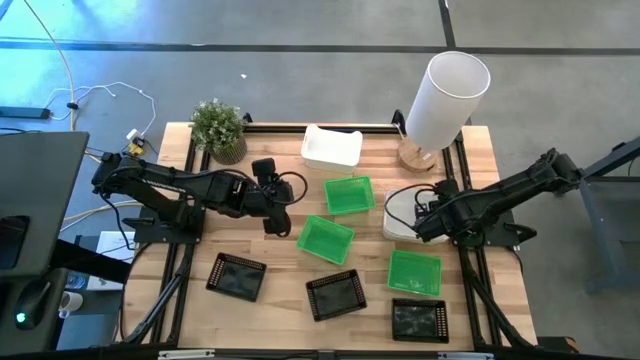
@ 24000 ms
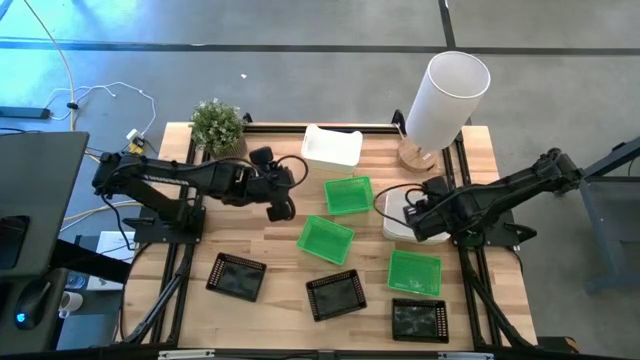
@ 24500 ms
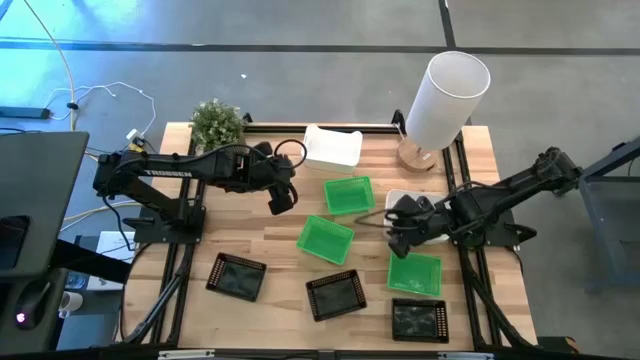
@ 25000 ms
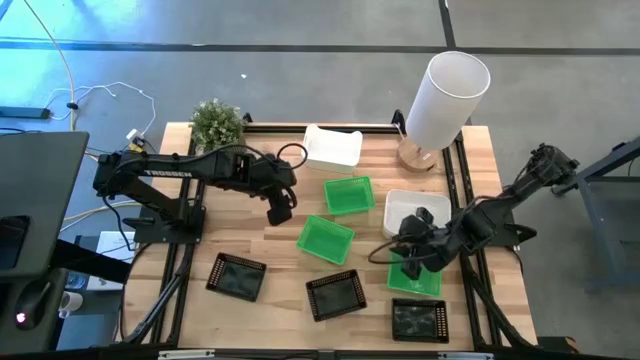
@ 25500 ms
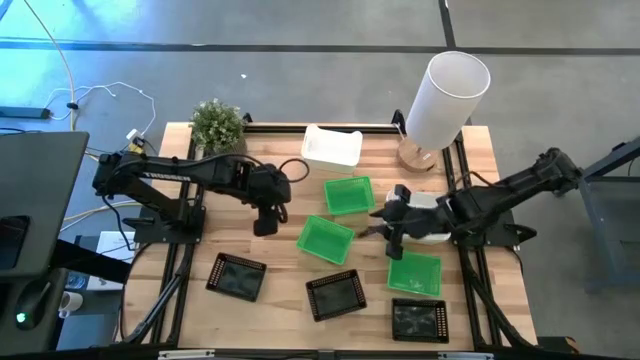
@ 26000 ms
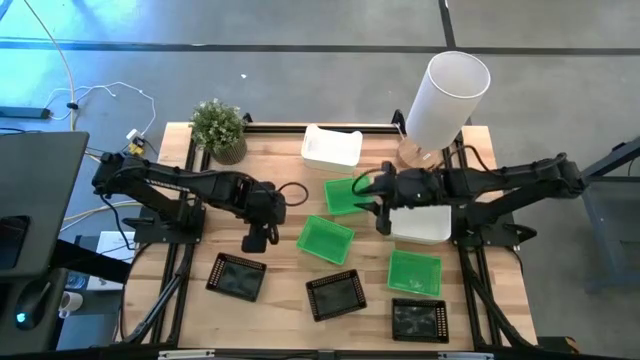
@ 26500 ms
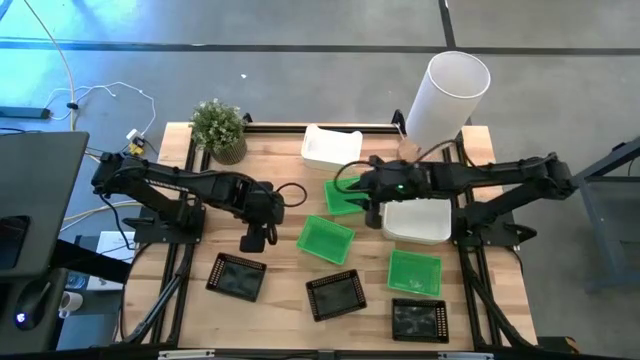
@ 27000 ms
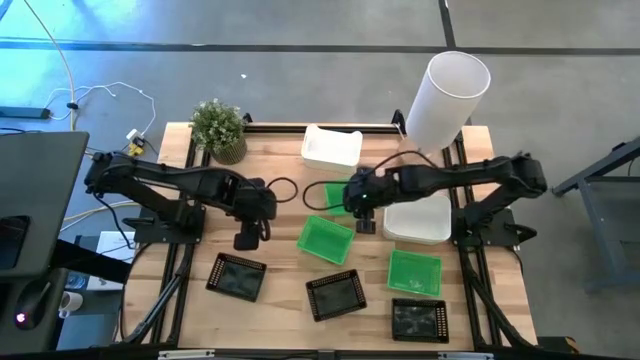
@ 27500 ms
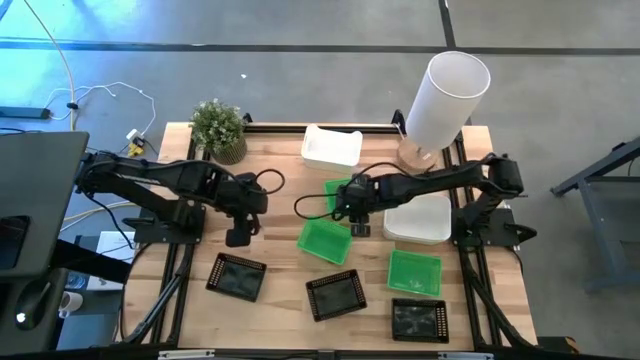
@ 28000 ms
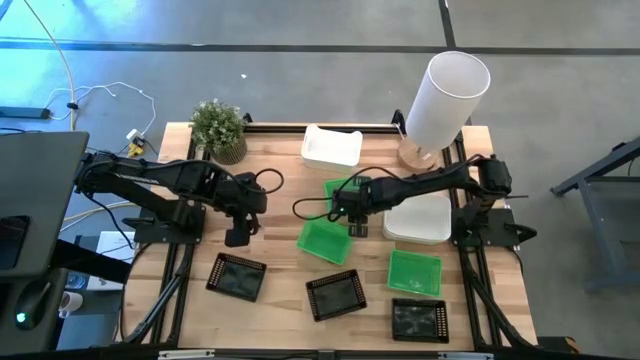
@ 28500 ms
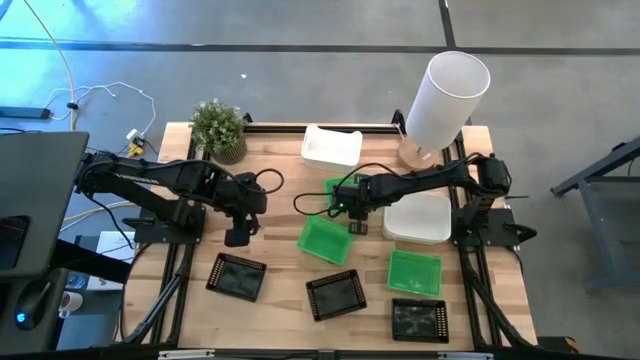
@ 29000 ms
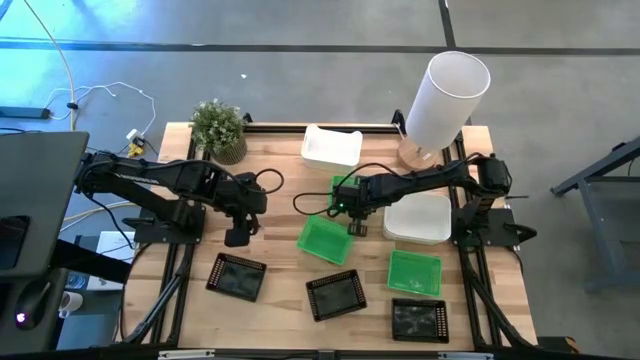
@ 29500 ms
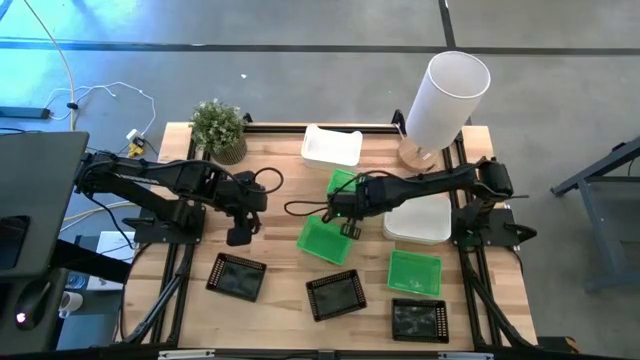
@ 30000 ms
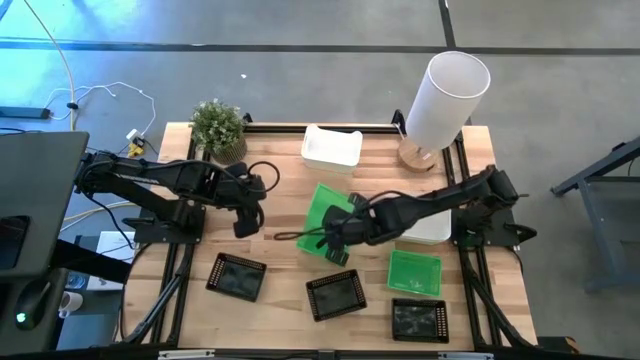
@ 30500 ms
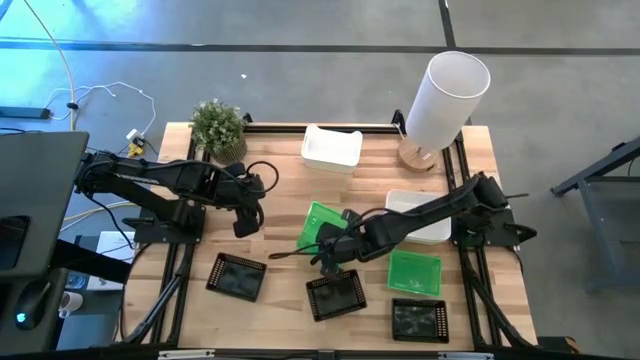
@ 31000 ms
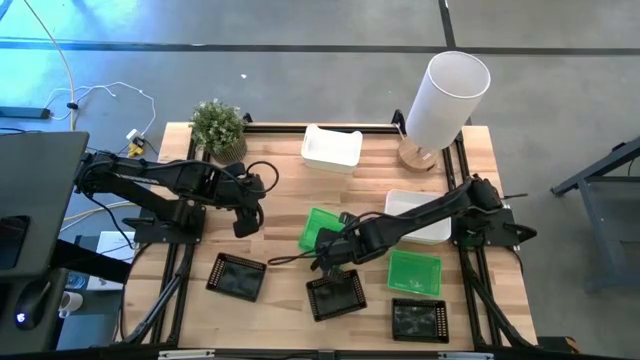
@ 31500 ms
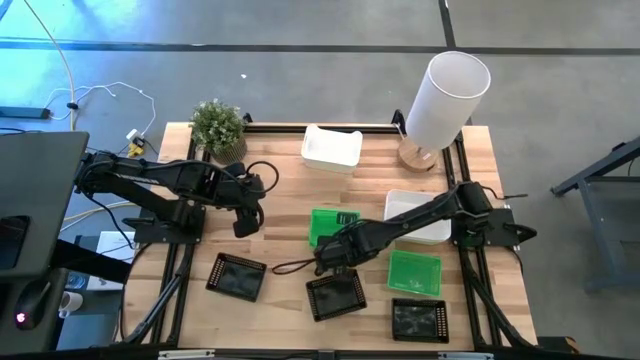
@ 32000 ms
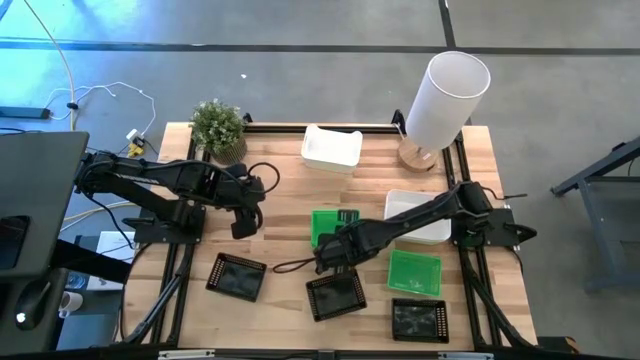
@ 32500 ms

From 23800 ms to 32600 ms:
Stack the top green bin on the middle left green bin

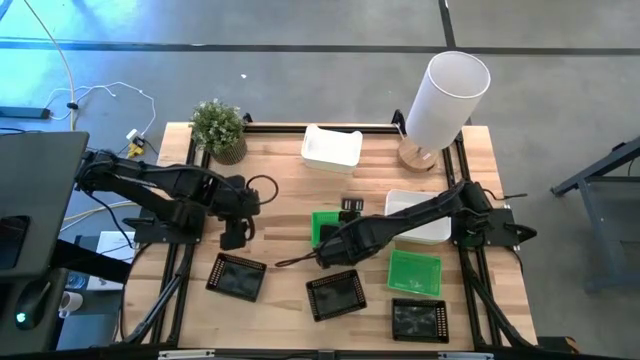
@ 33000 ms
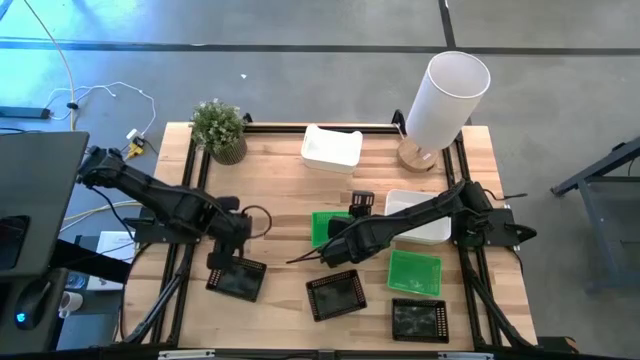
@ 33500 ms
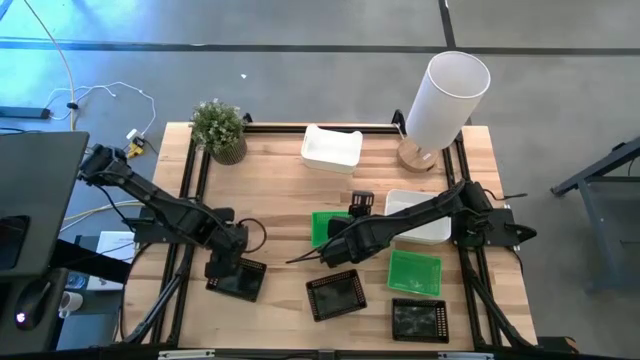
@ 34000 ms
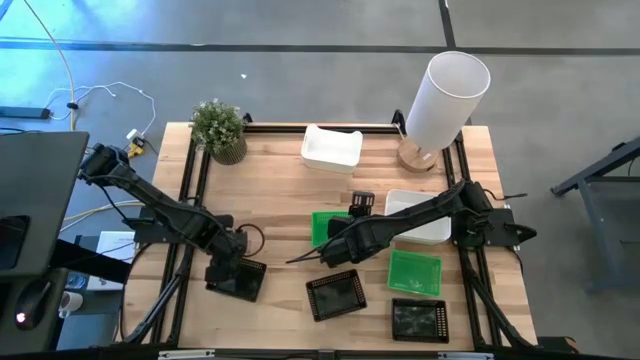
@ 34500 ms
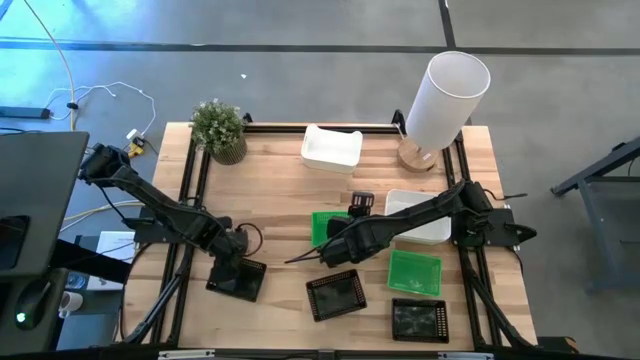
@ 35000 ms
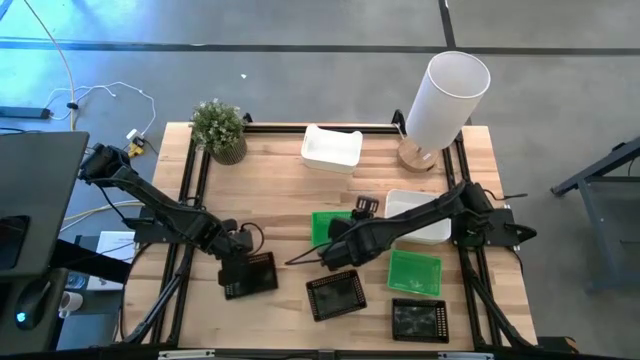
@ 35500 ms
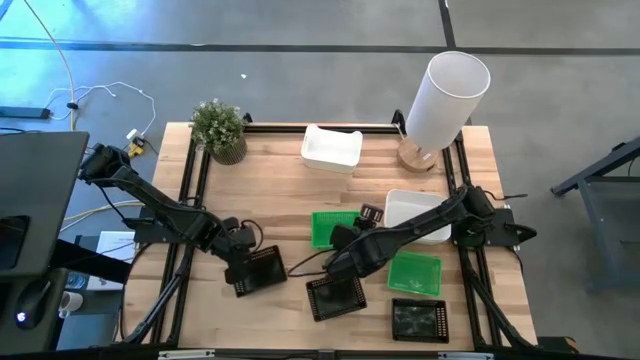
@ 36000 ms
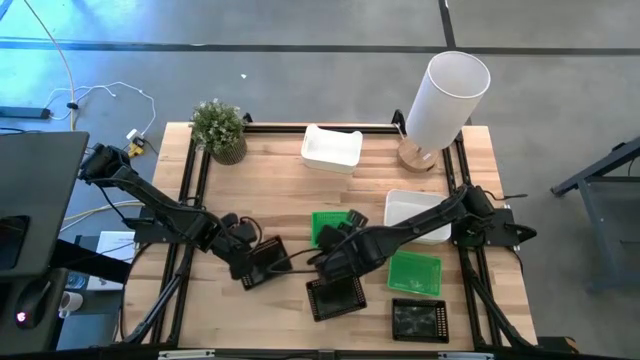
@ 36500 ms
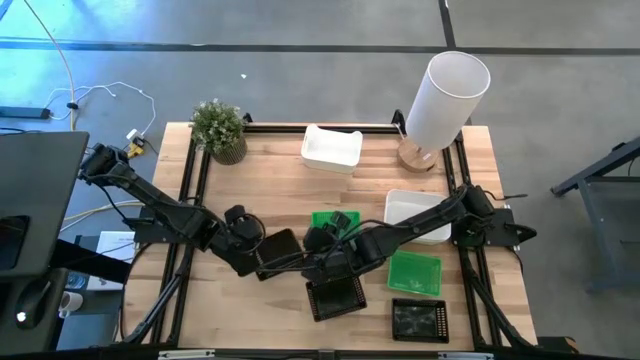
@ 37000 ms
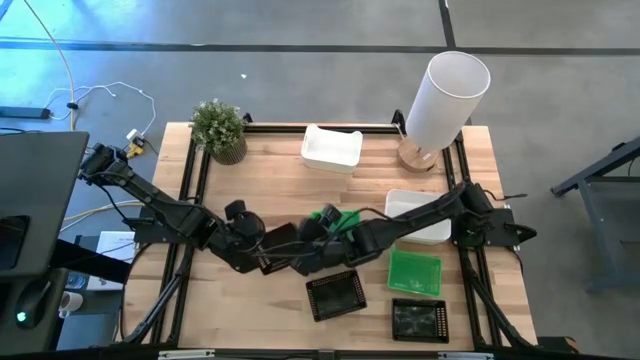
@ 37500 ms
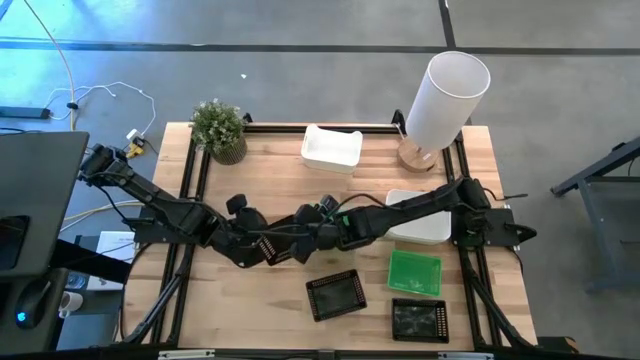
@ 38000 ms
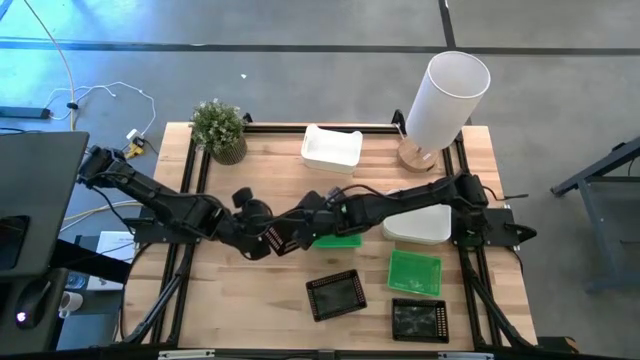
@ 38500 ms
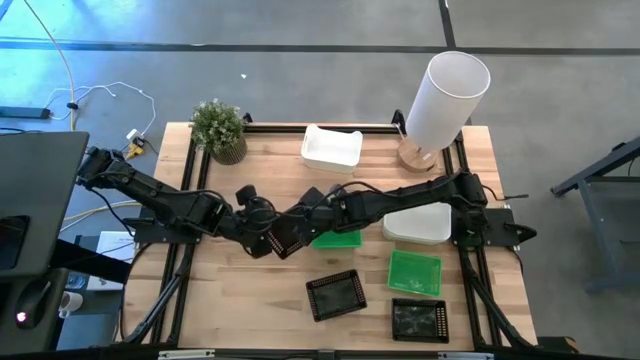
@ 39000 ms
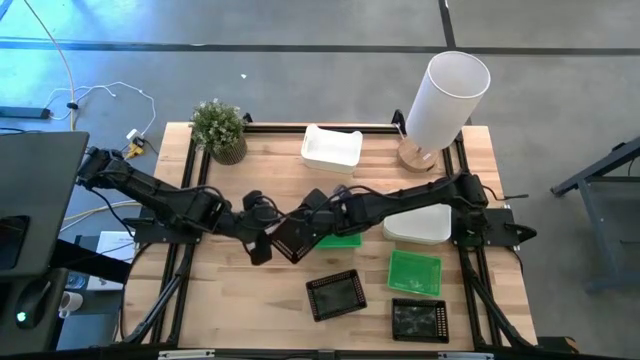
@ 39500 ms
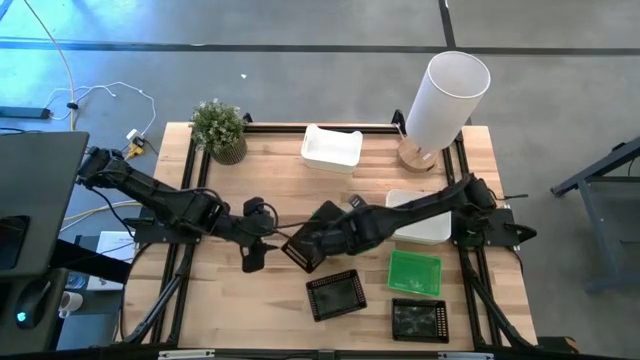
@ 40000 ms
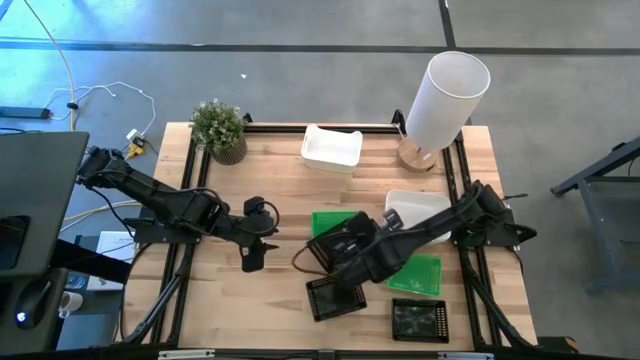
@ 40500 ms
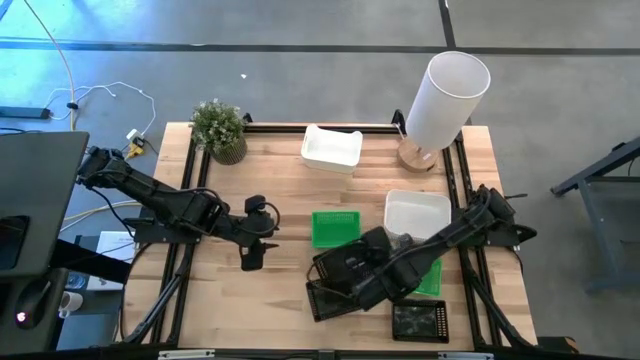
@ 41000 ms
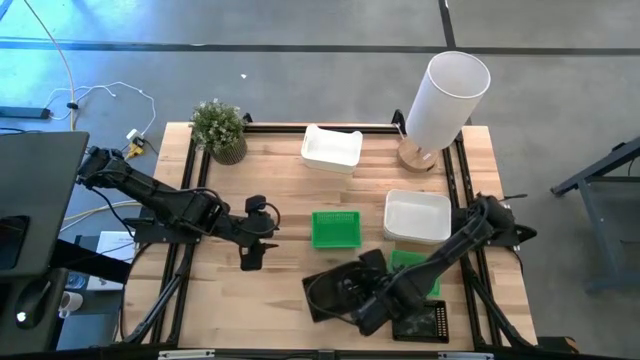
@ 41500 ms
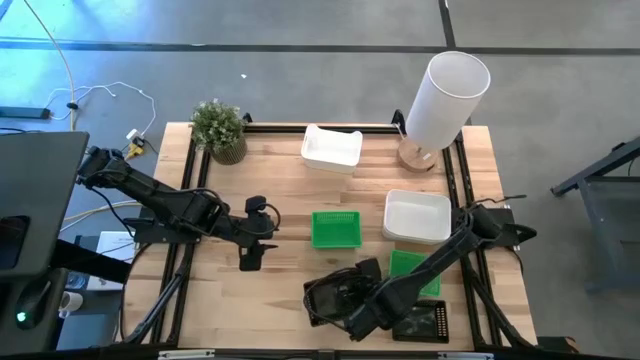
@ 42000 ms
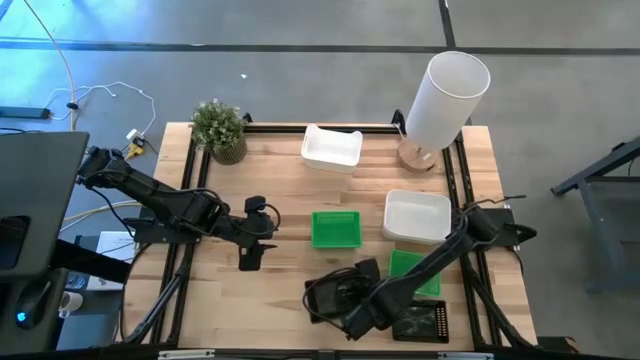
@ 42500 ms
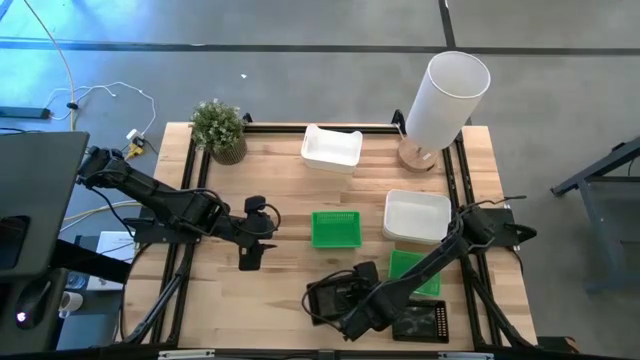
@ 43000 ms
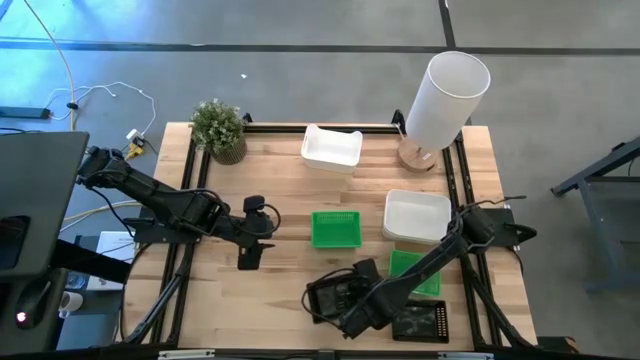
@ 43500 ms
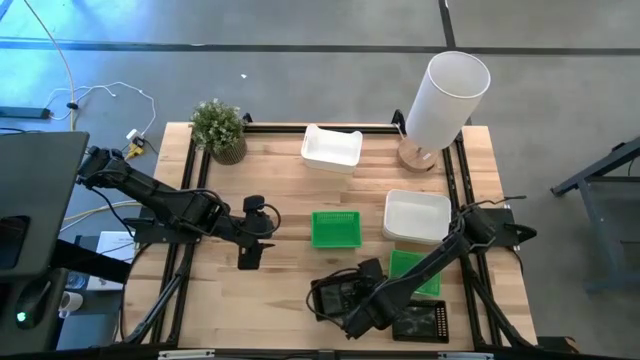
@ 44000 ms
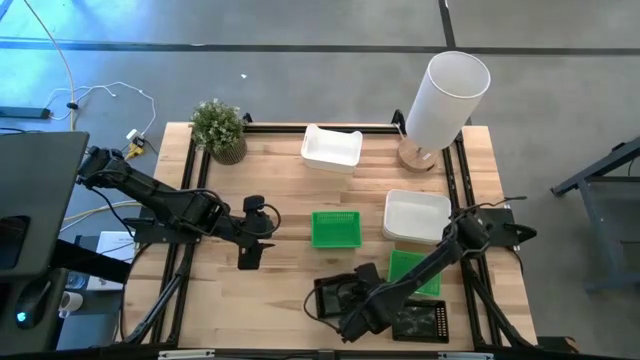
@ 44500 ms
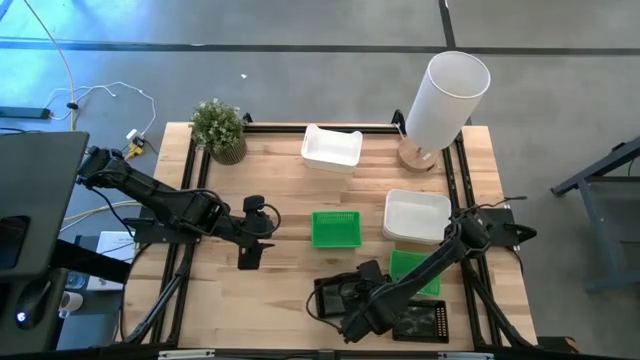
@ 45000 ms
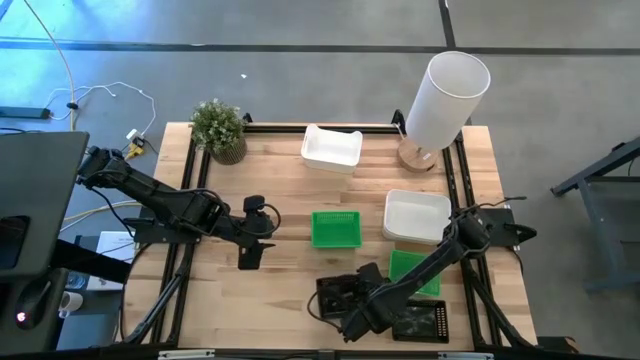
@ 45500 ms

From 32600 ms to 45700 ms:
Stack the left black bin on the center black bin
